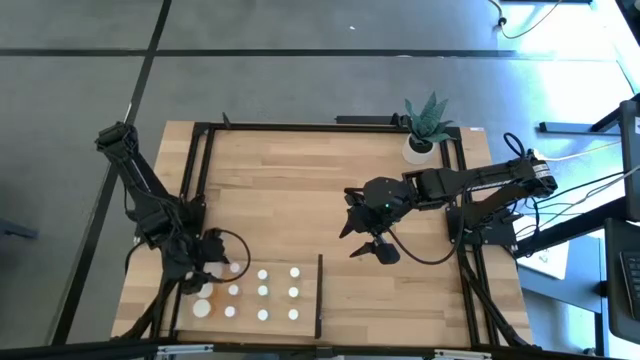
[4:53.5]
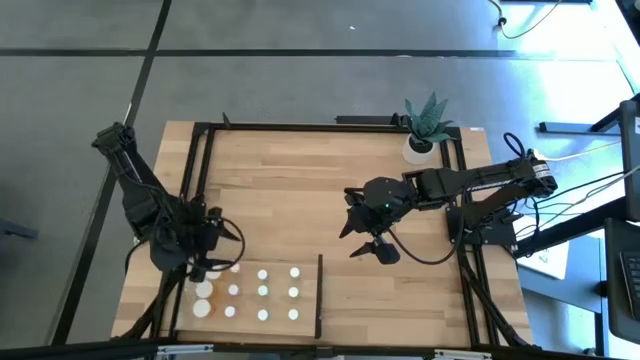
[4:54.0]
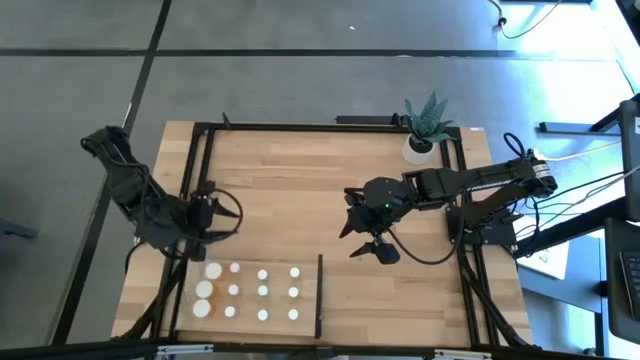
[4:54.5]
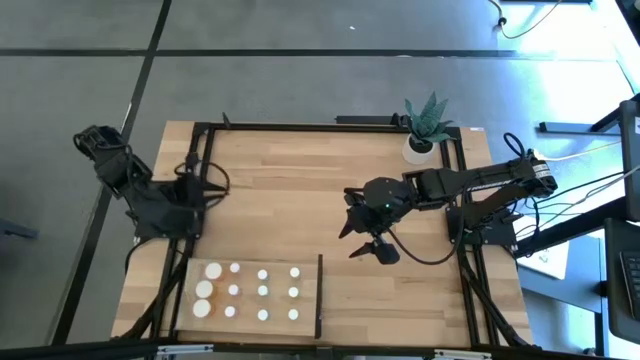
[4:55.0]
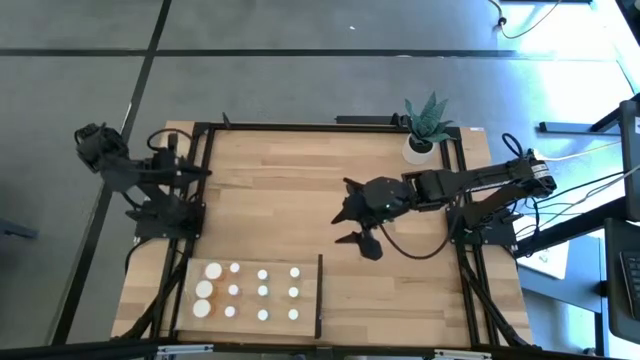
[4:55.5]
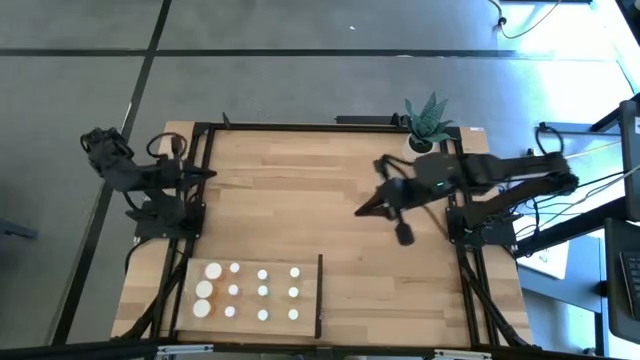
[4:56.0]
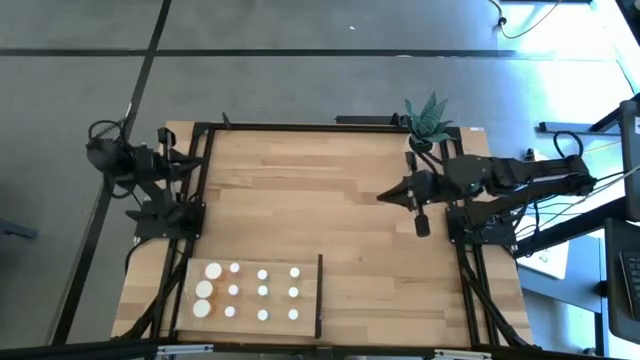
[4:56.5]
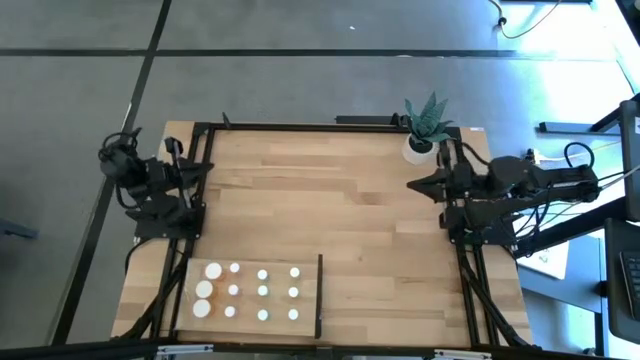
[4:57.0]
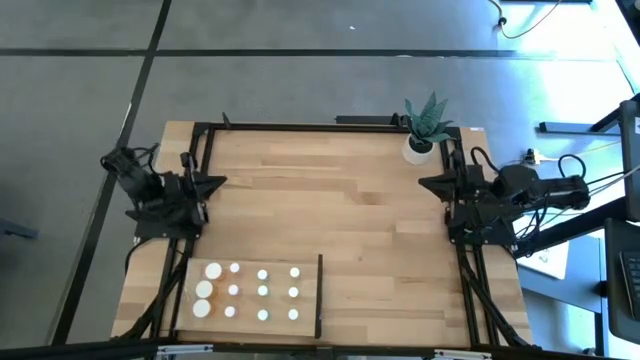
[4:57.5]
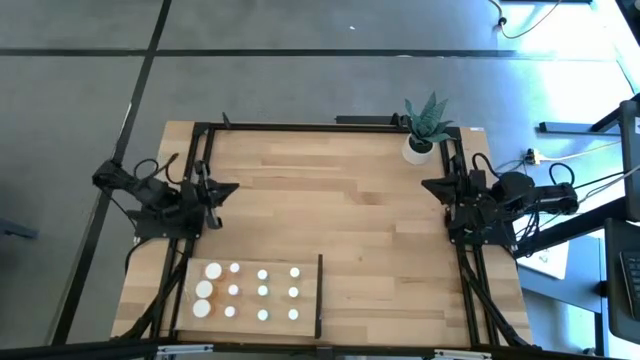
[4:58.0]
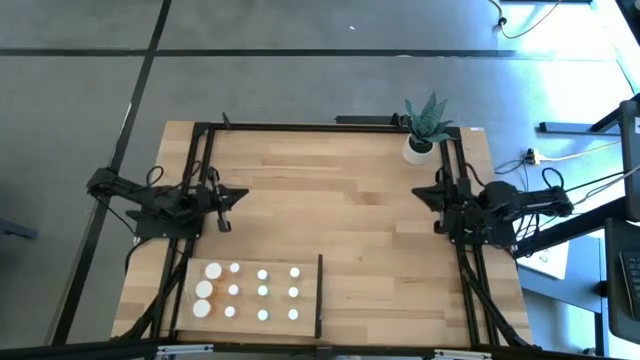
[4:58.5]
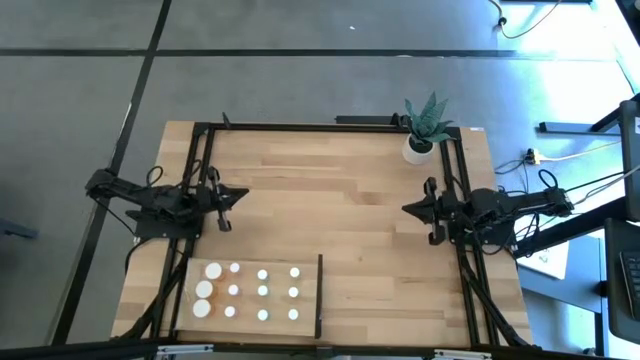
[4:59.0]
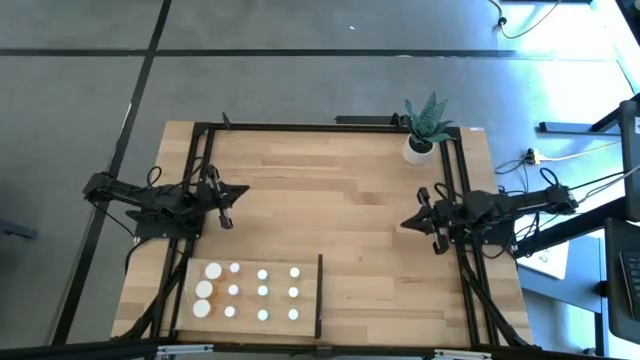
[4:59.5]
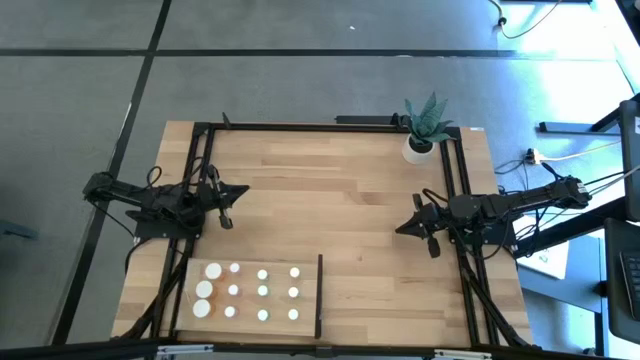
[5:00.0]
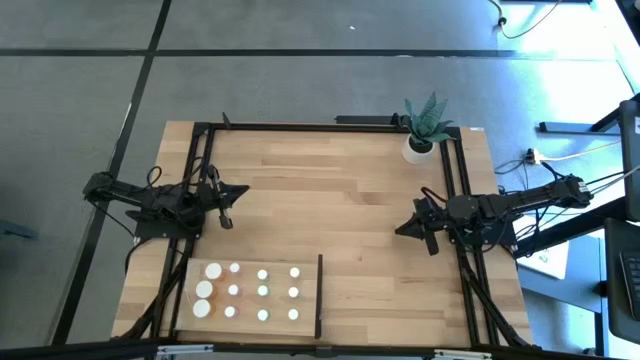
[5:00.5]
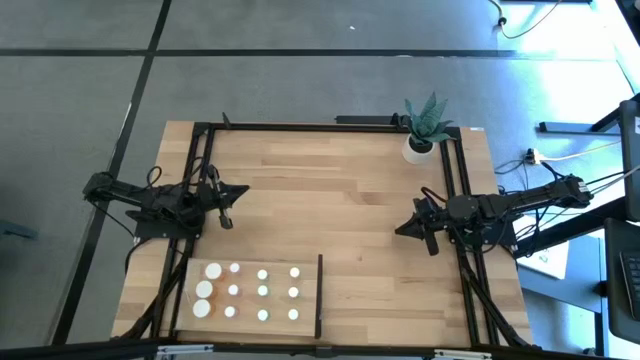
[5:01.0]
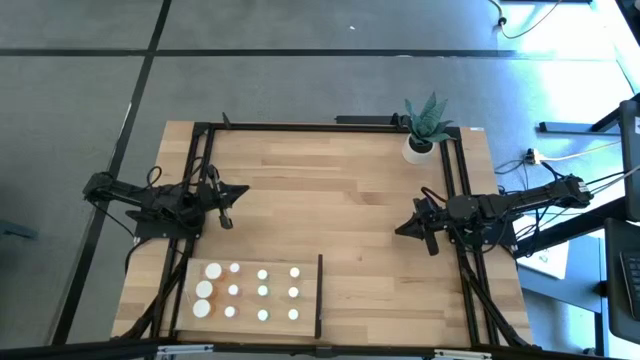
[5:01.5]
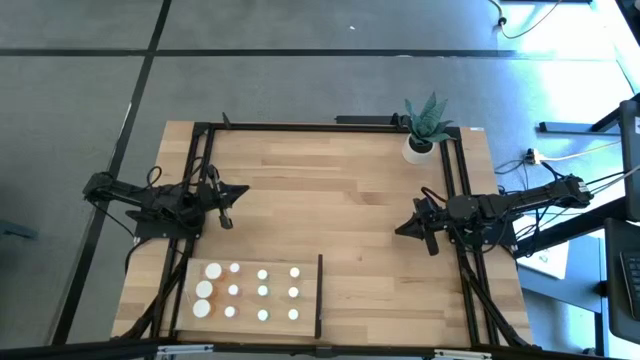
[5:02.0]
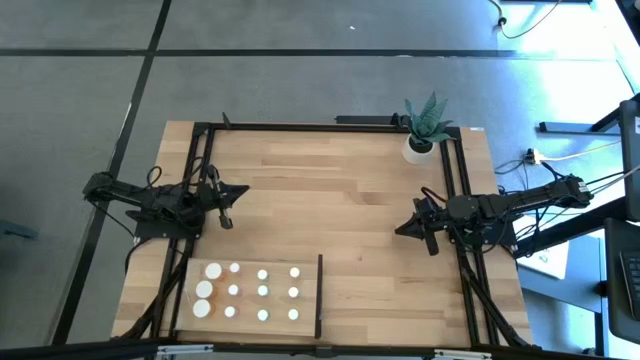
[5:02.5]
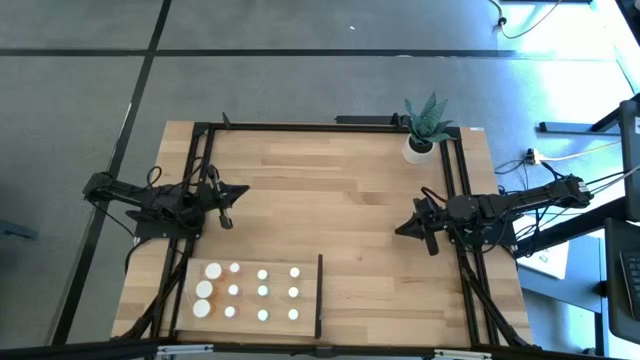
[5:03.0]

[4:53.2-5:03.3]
Task: Pick and place medicine bottles onto shelf by color
Return to Home Position

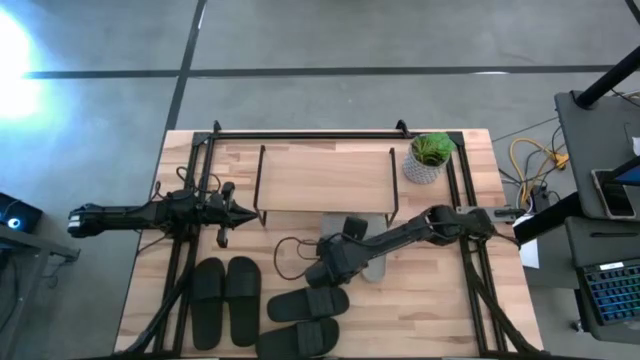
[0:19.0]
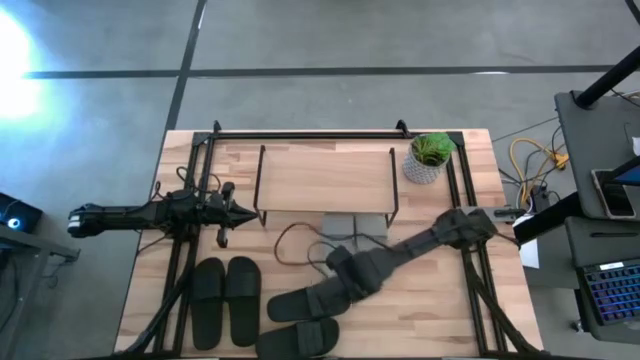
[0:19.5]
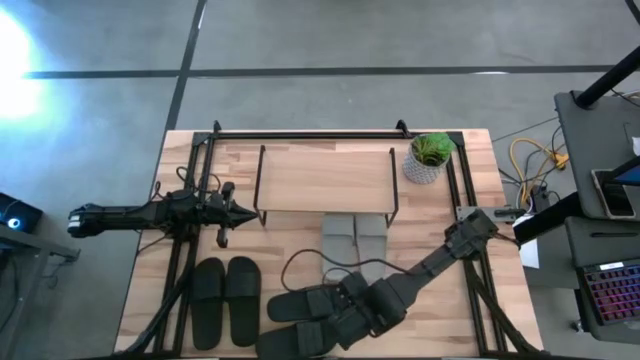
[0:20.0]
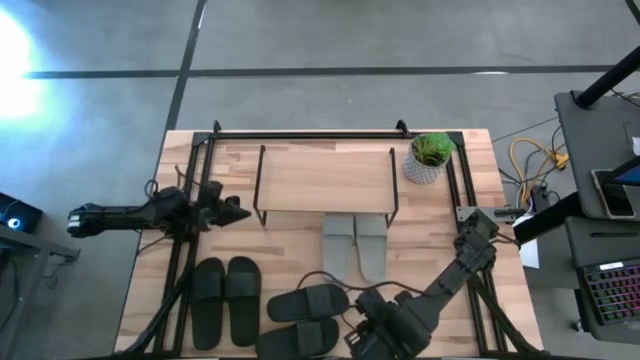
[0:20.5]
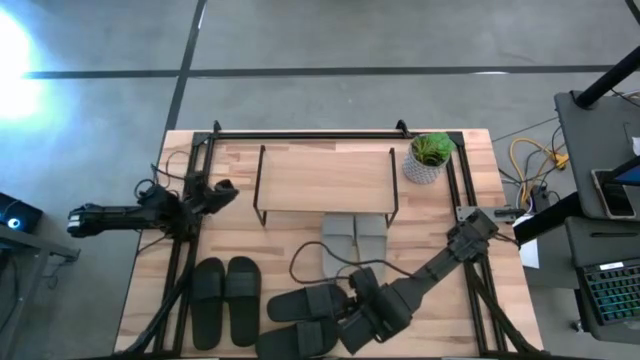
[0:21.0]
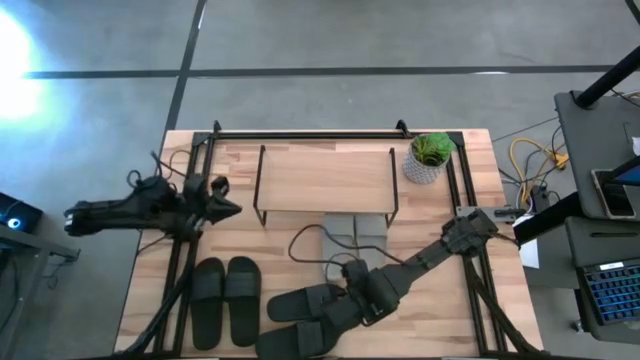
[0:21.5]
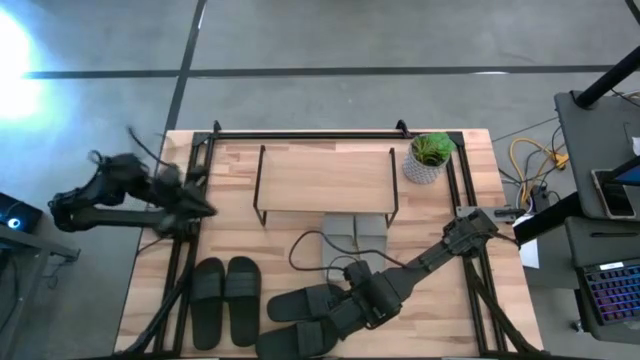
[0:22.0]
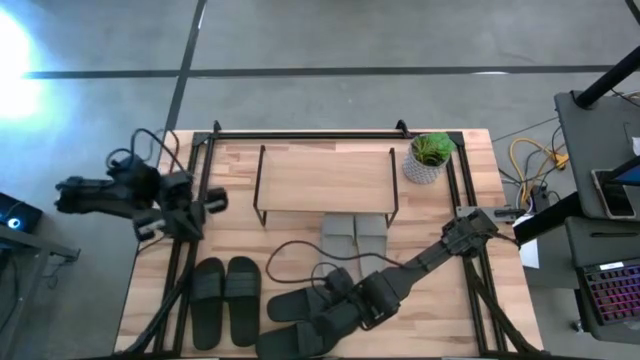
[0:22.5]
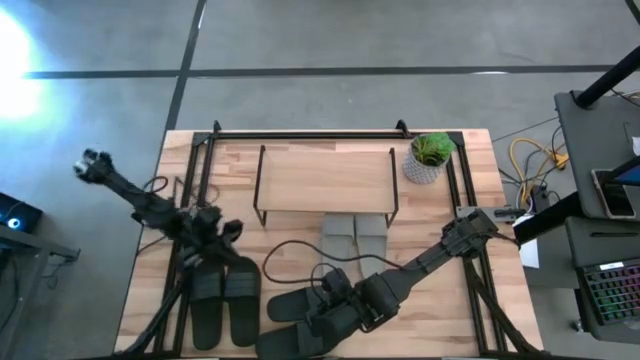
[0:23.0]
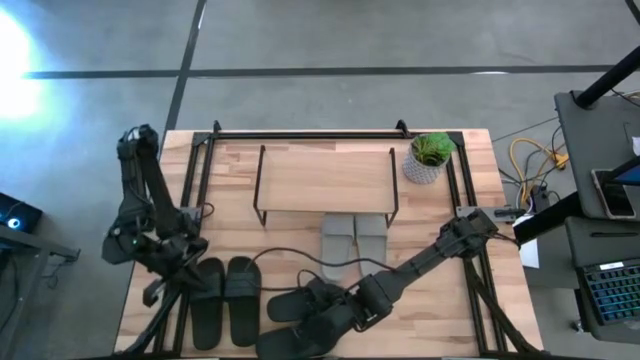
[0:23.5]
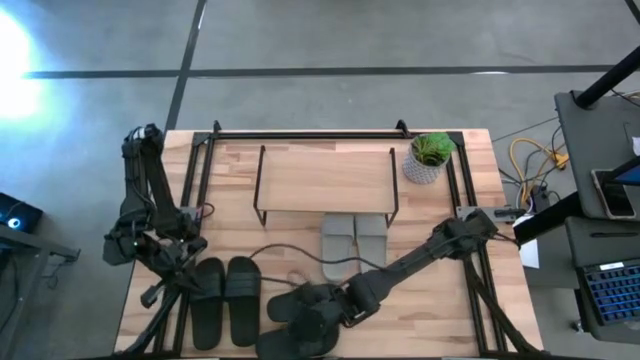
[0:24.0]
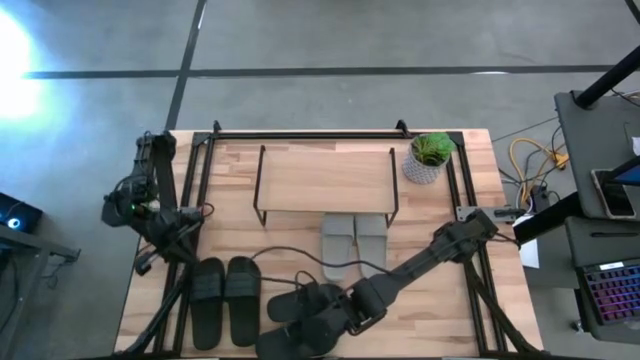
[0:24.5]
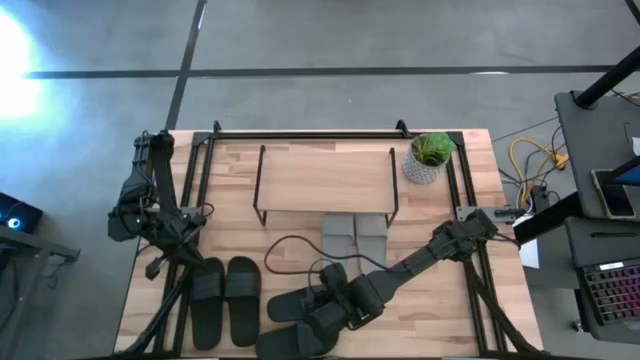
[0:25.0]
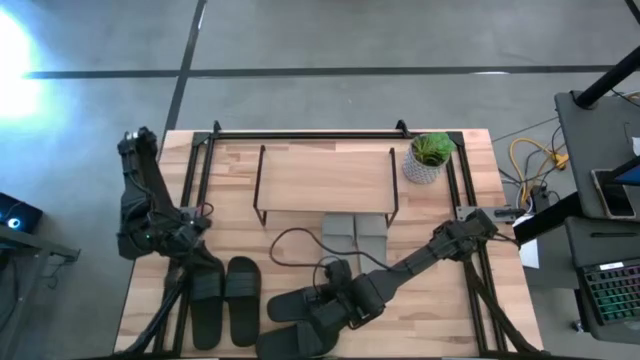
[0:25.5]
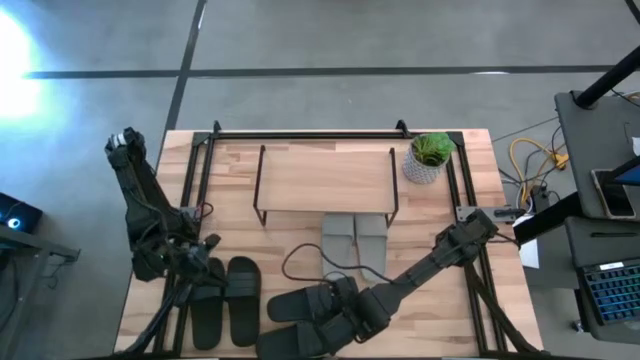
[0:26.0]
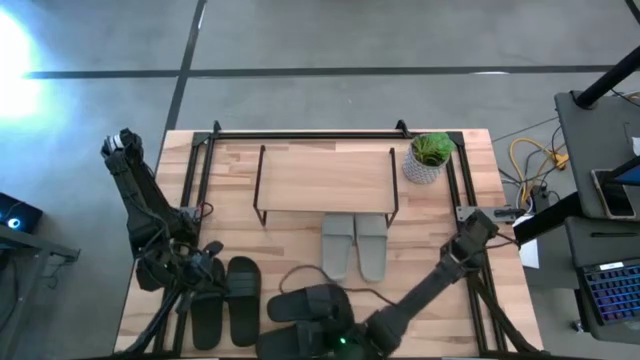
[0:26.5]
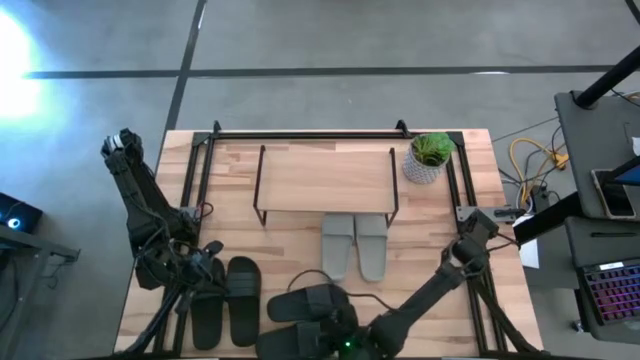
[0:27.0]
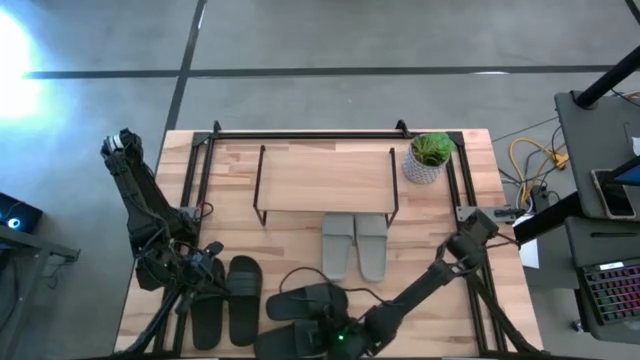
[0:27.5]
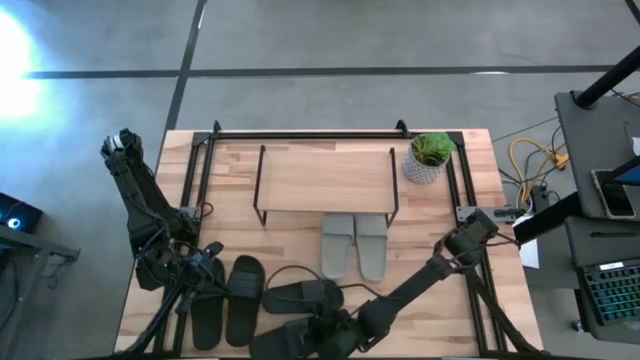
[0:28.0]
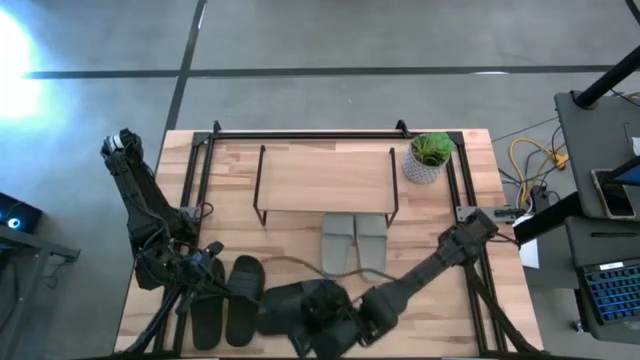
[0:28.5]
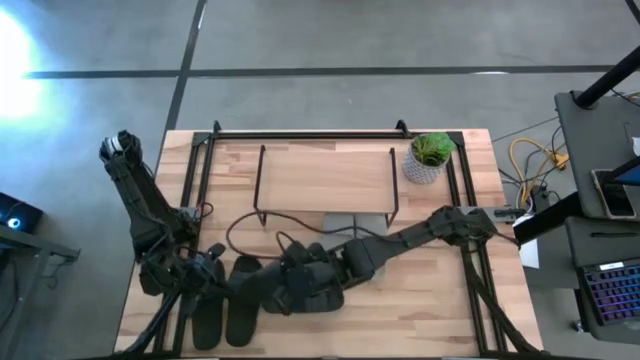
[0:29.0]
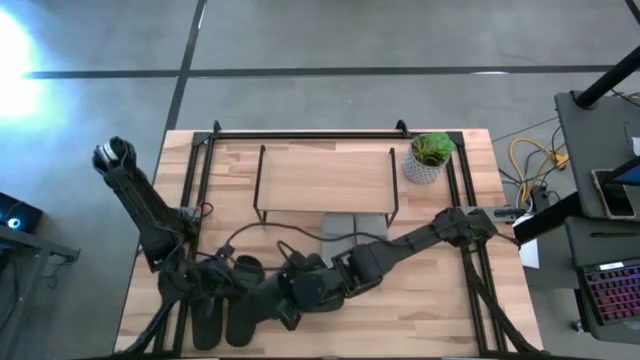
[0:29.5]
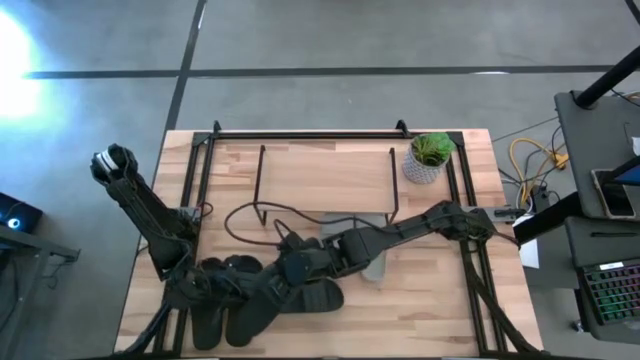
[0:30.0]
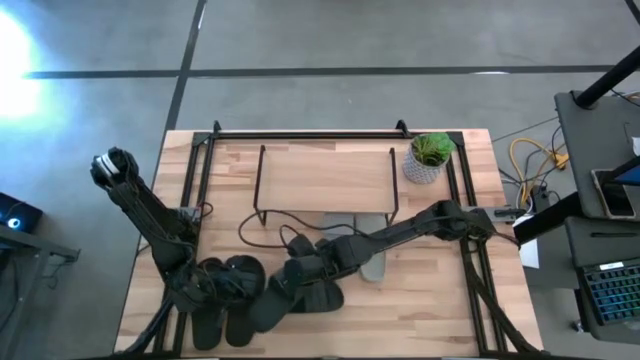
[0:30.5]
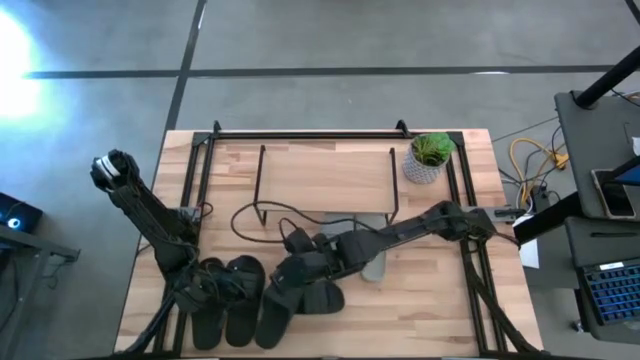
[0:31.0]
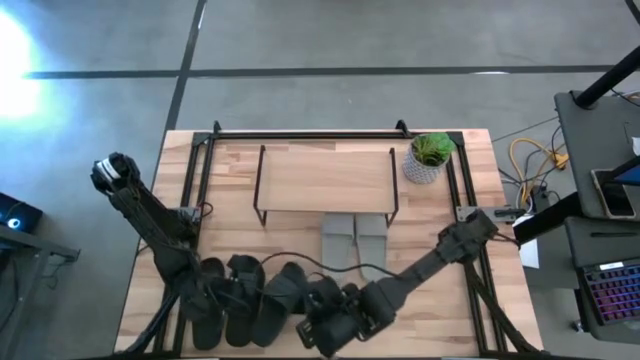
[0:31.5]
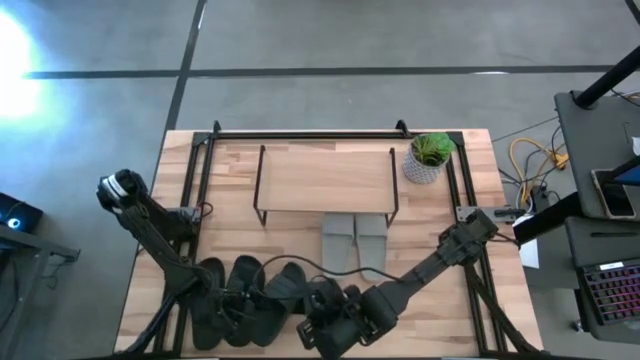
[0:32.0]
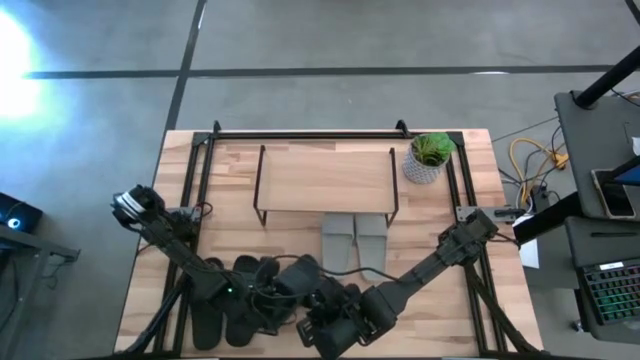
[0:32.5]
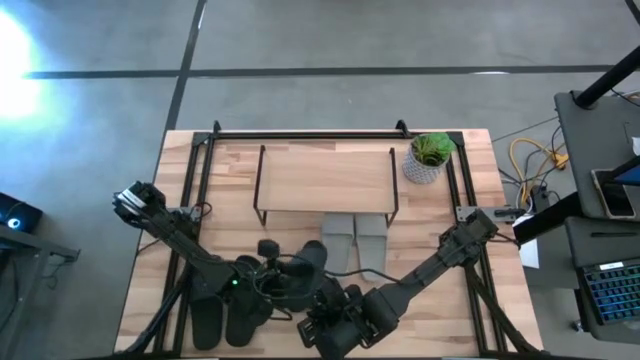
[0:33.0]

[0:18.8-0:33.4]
Task: Pick and place slides into the shelf
Put the black slide under the shelf
